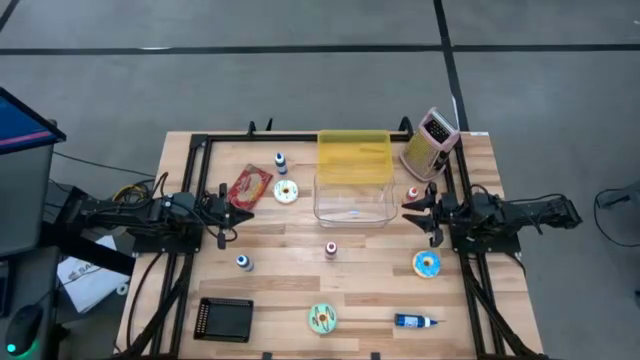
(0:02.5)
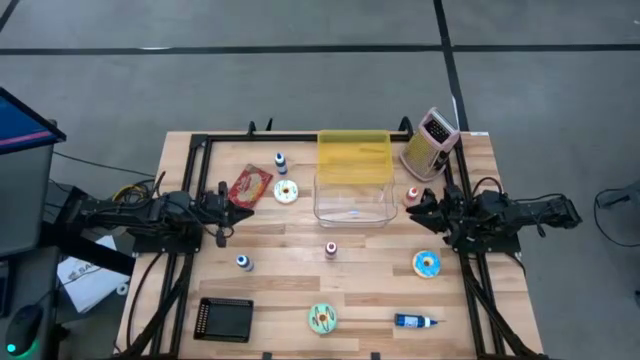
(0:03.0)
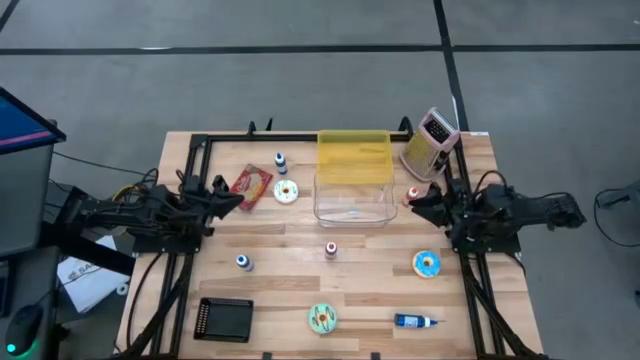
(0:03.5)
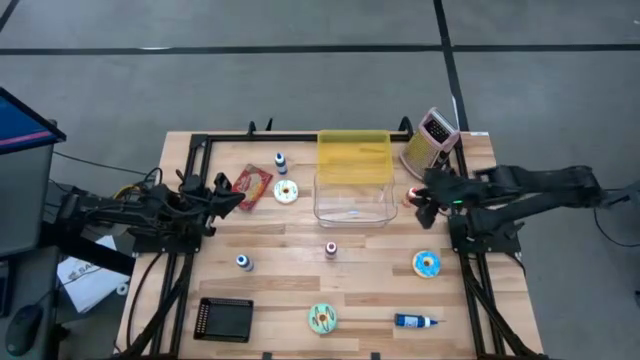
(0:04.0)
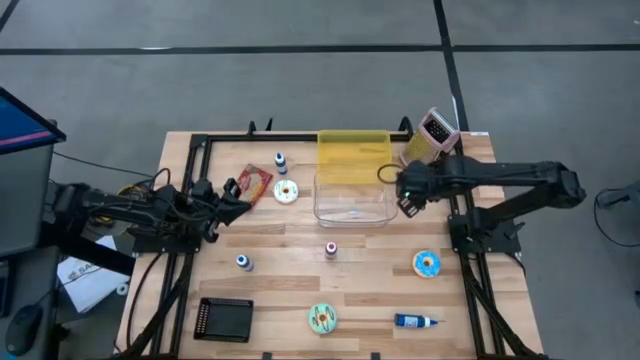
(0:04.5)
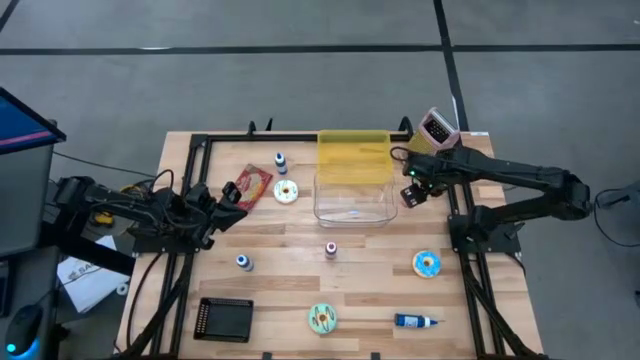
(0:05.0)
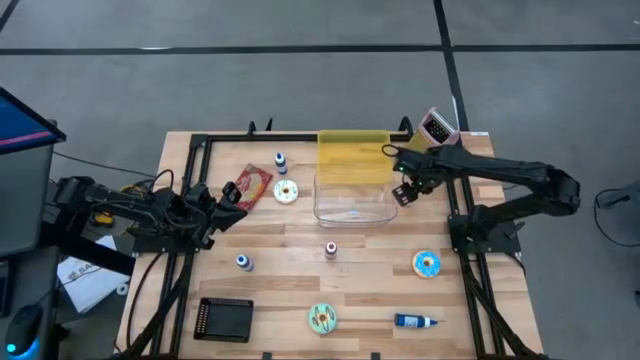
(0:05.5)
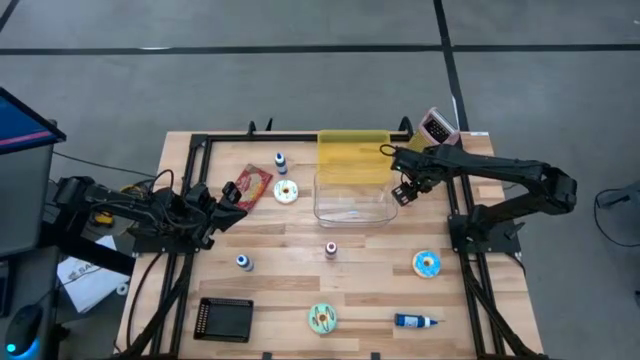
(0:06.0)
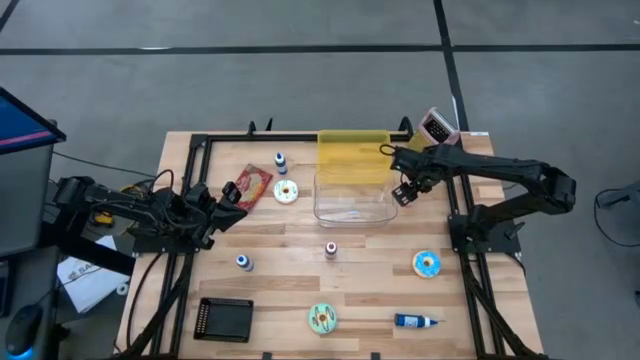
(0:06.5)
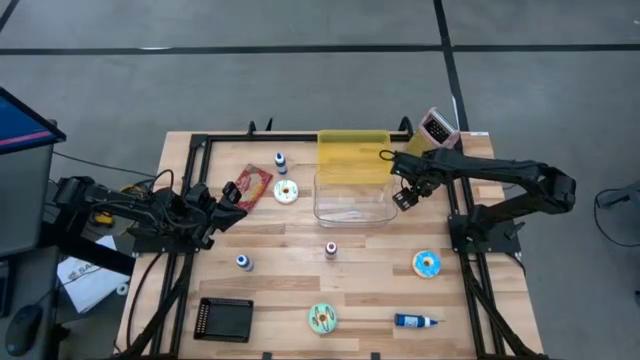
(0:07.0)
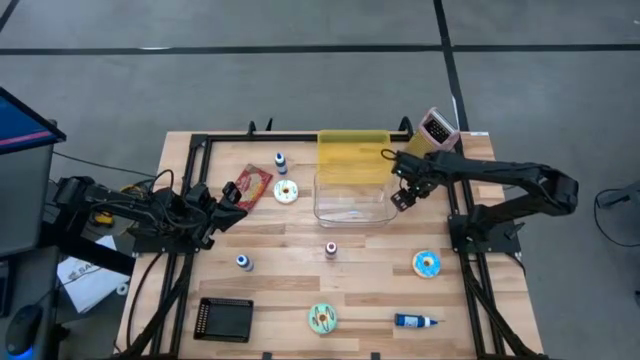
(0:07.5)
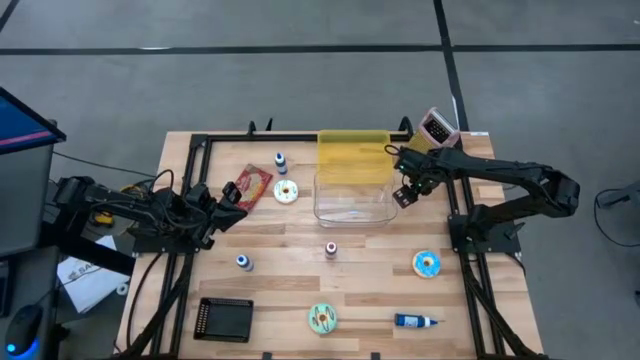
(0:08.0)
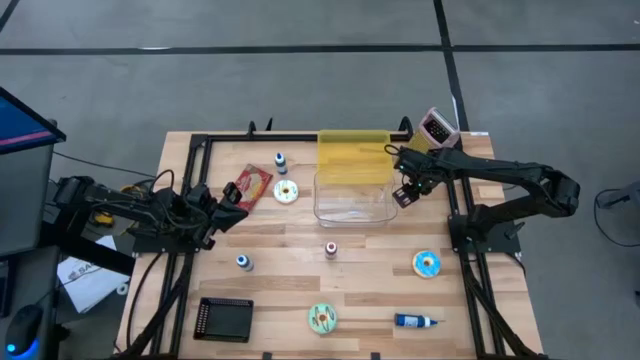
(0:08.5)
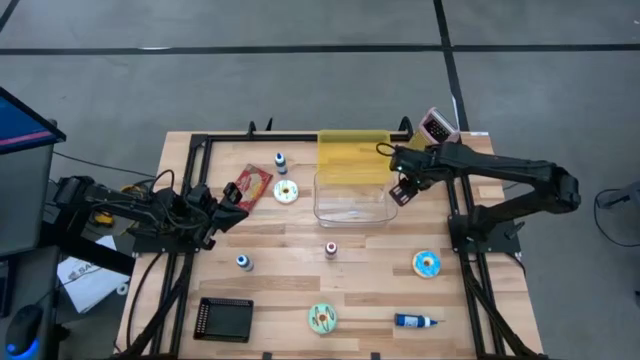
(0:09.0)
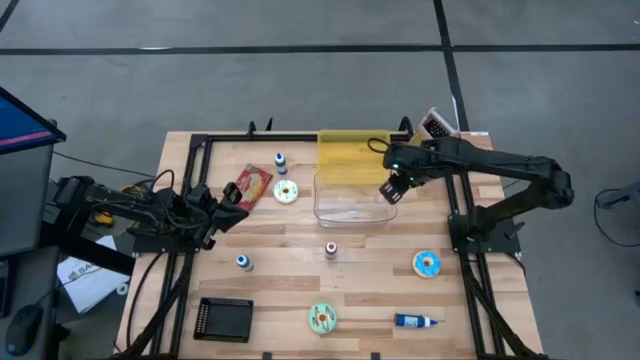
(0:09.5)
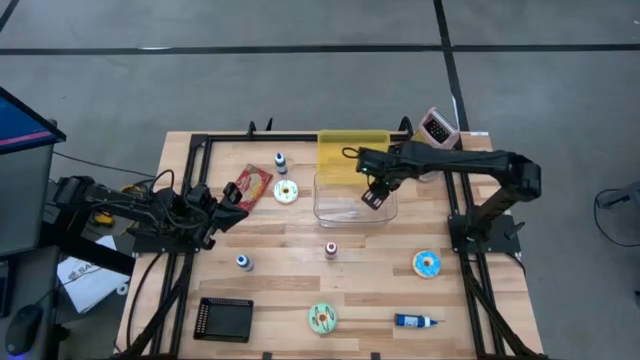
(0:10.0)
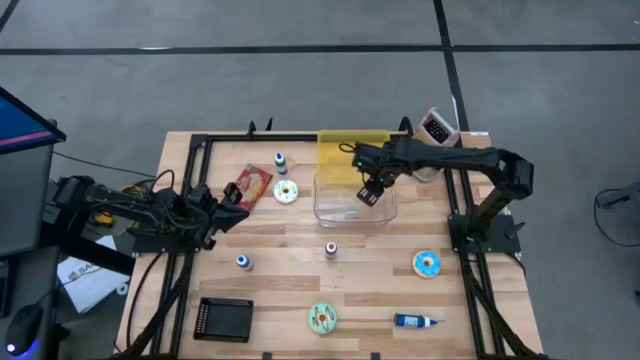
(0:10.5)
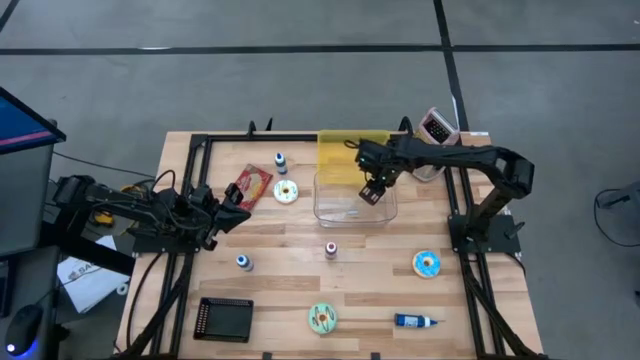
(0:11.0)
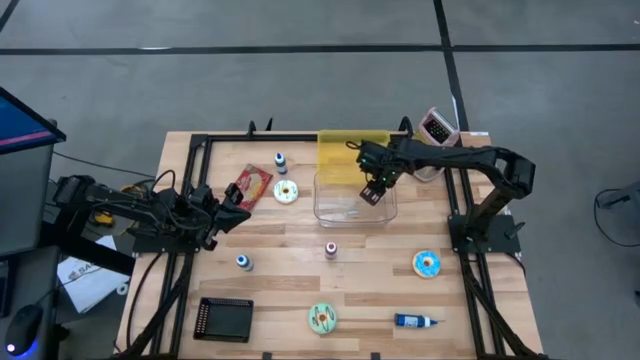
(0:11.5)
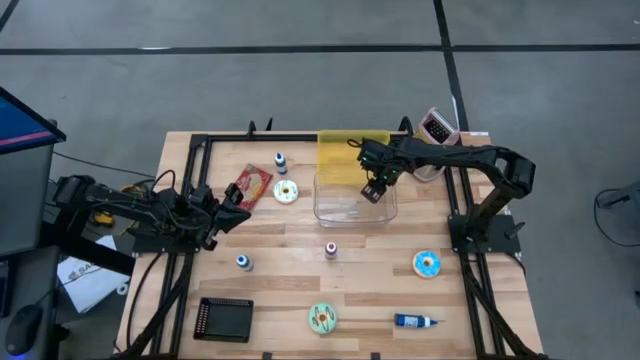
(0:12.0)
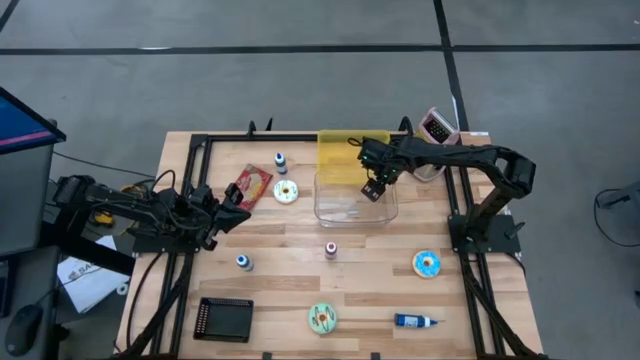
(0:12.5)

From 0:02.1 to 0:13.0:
Put the orange food coloring bottle into the transparent bin

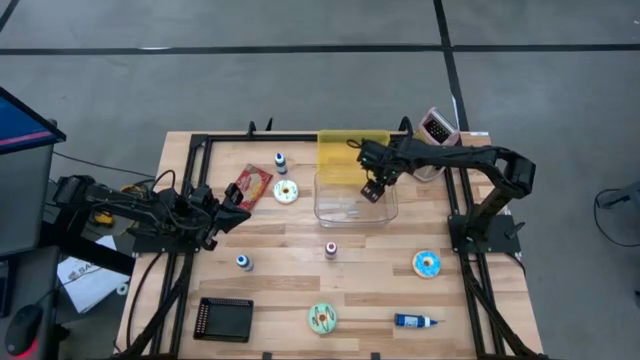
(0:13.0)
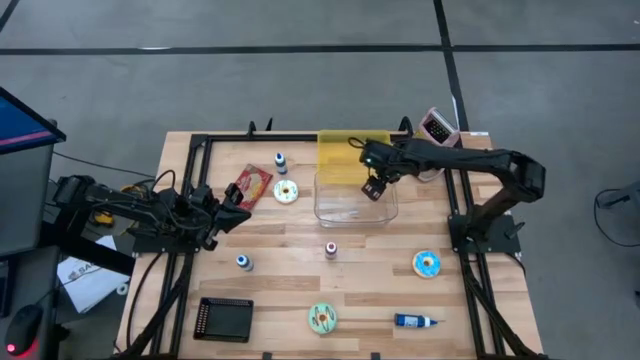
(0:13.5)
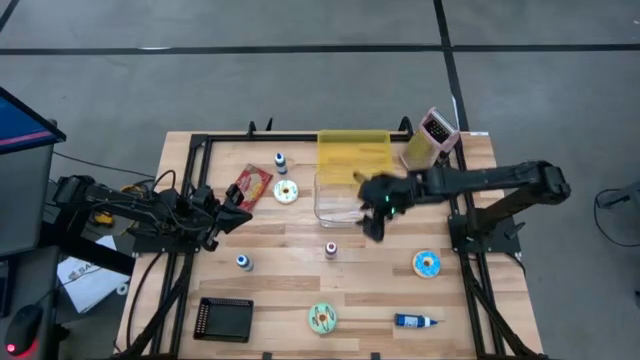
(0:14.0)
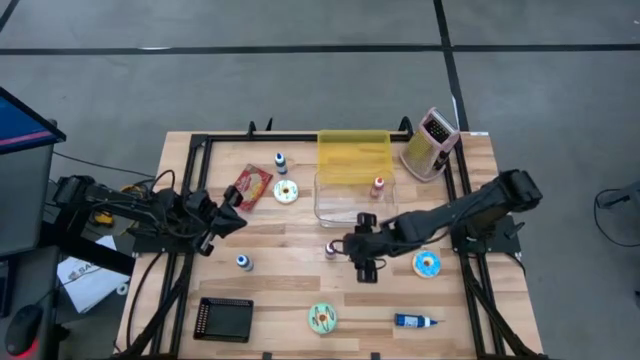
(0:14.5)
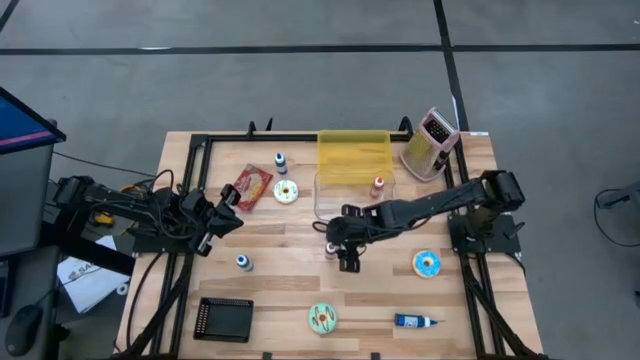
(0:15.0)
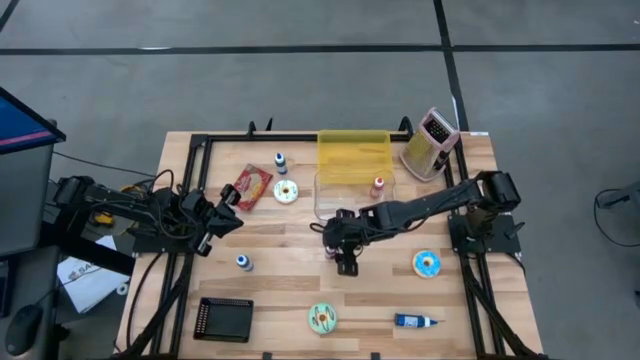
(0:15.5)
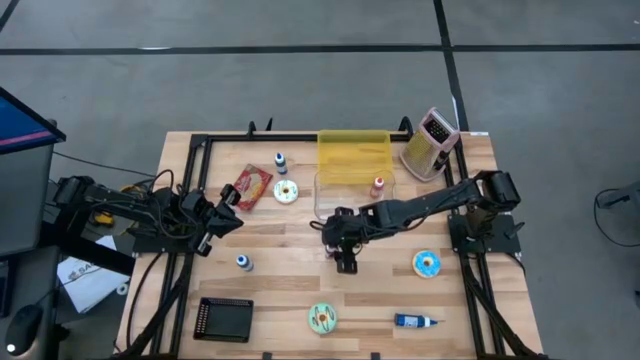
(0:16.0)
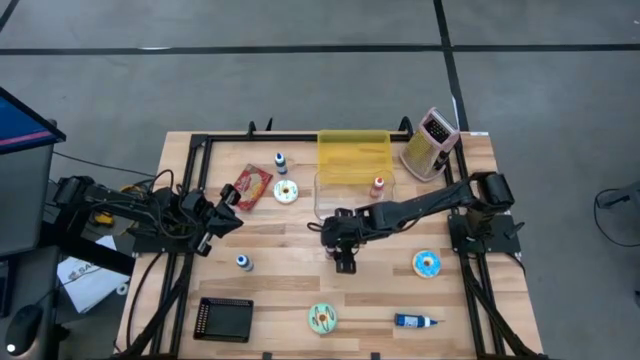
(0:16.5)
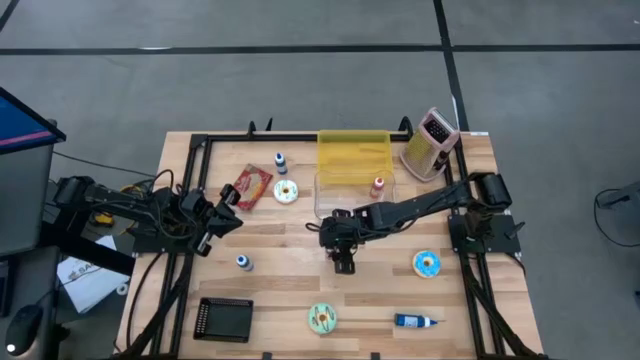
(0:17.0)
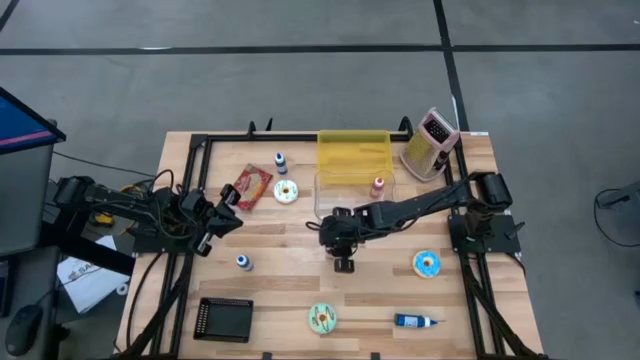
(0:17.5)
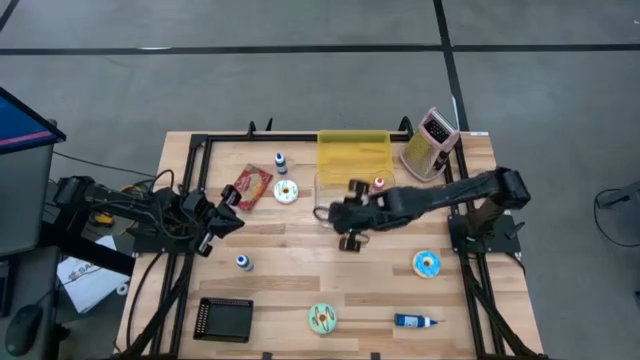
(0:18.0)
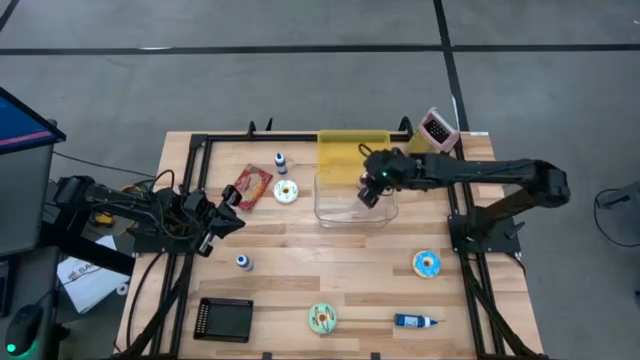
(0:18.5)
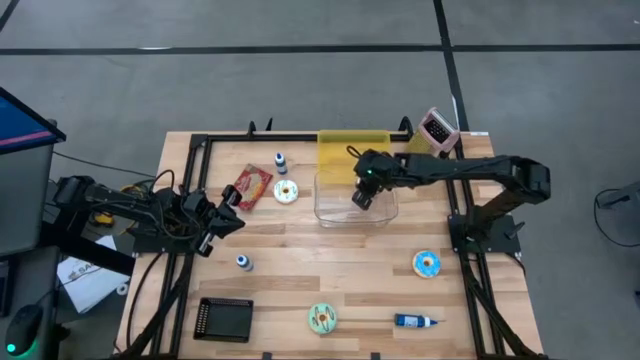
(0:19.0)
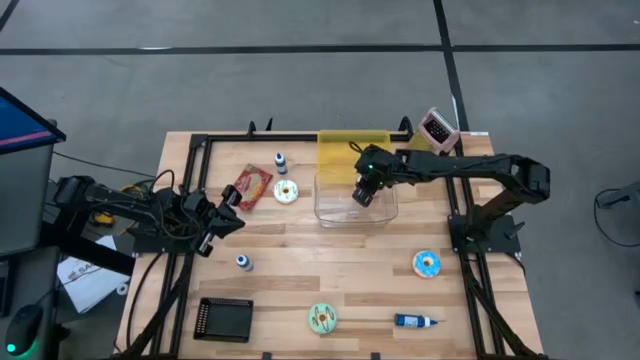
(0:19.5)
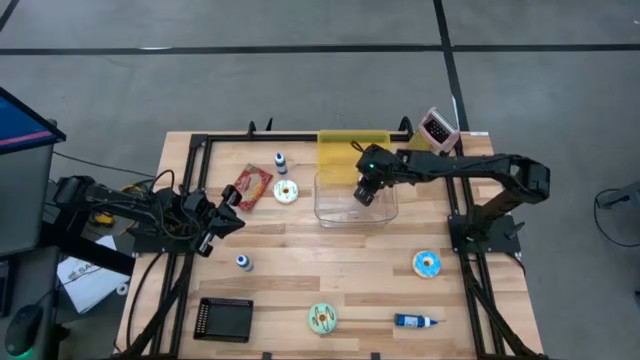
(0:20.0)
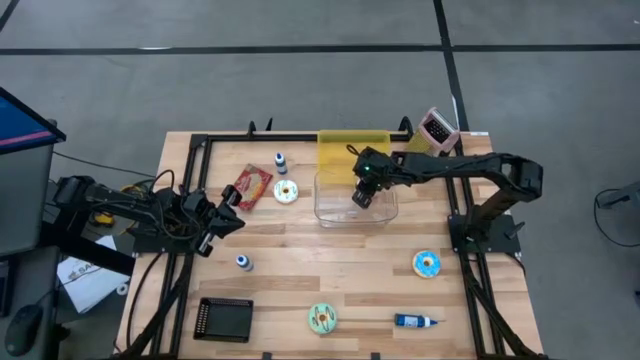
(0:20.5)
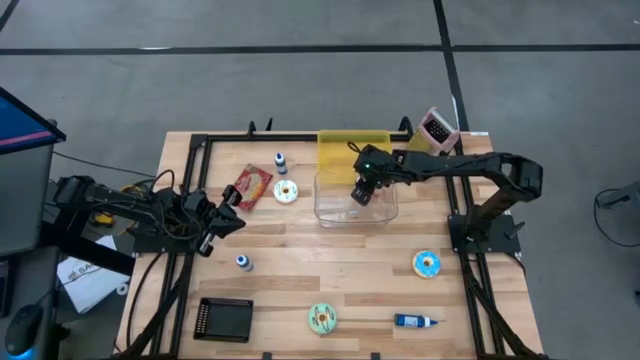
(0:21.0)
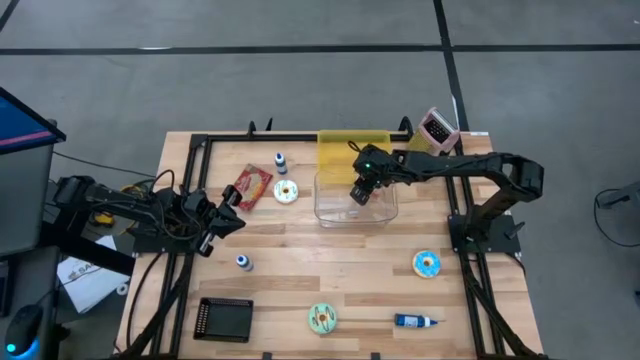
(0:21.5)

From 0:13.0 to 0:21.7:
Put the red food coloring bottle into the transparent bin
